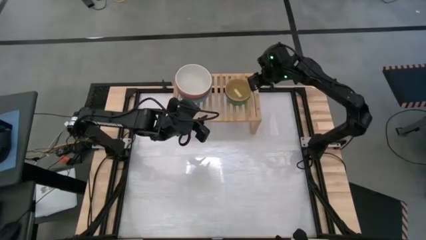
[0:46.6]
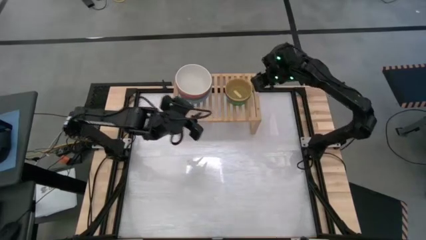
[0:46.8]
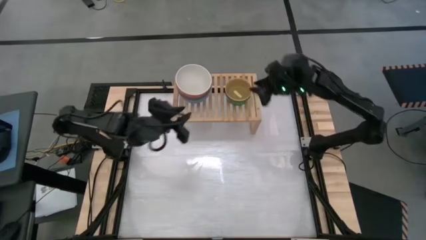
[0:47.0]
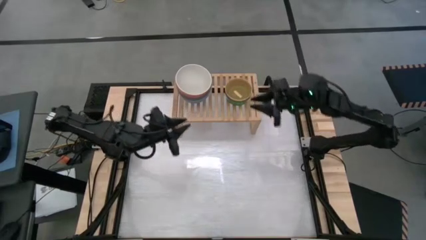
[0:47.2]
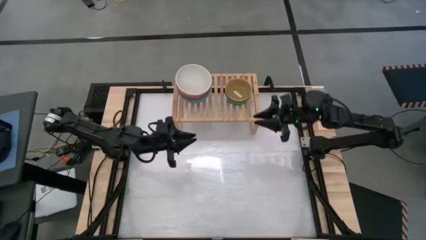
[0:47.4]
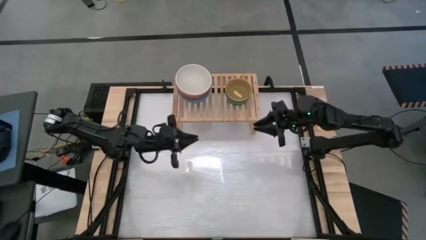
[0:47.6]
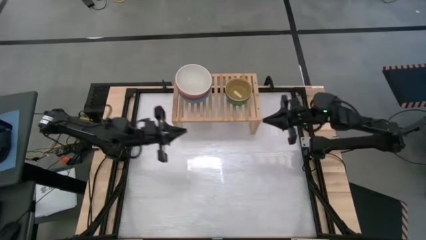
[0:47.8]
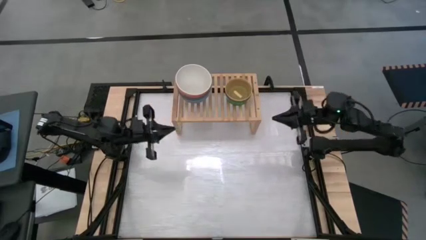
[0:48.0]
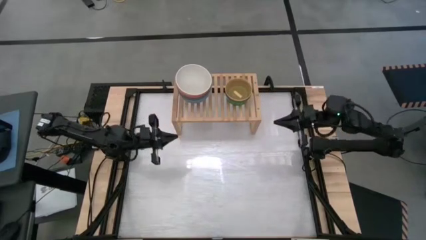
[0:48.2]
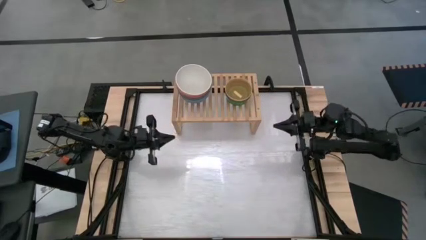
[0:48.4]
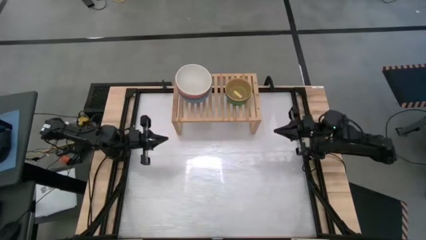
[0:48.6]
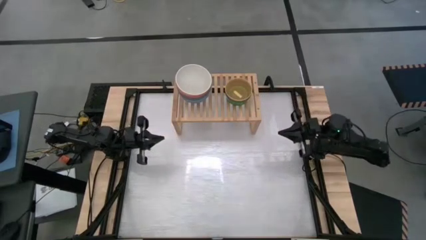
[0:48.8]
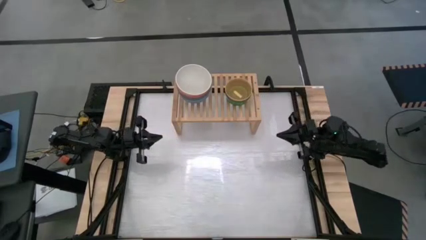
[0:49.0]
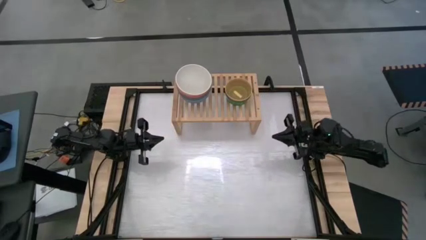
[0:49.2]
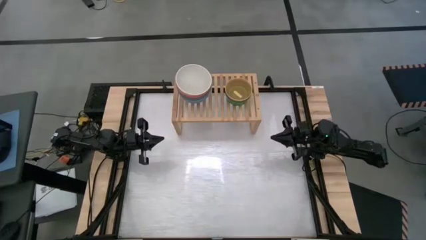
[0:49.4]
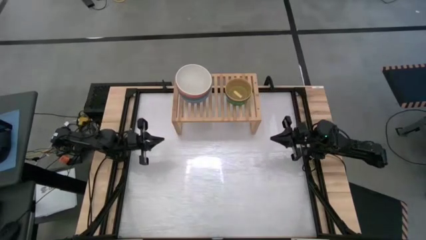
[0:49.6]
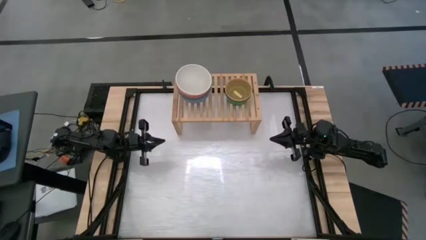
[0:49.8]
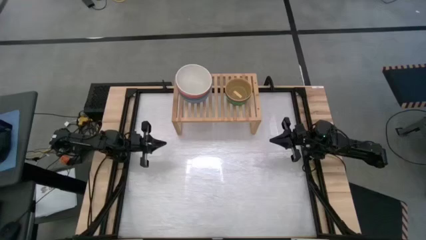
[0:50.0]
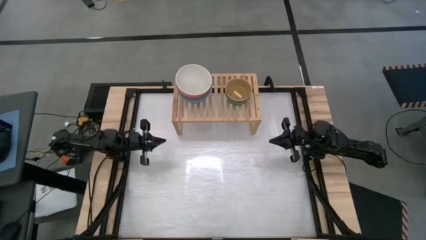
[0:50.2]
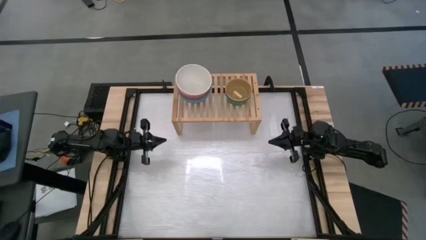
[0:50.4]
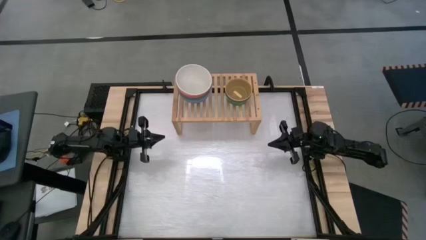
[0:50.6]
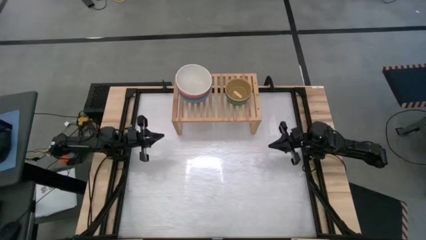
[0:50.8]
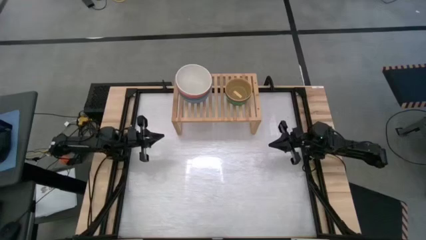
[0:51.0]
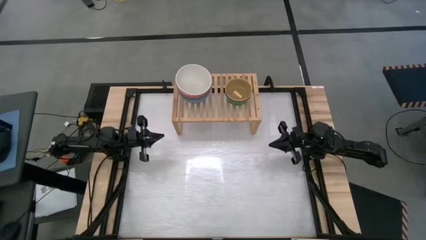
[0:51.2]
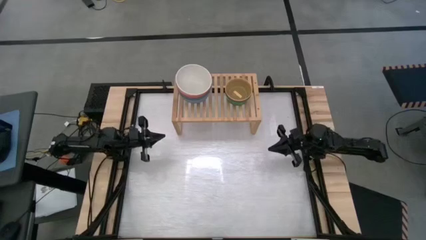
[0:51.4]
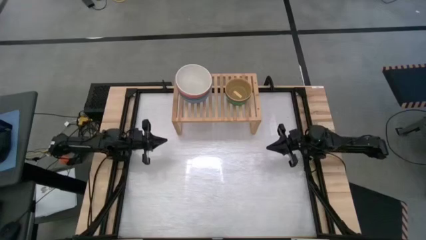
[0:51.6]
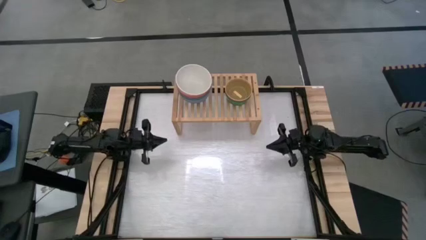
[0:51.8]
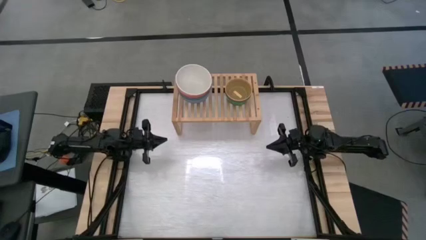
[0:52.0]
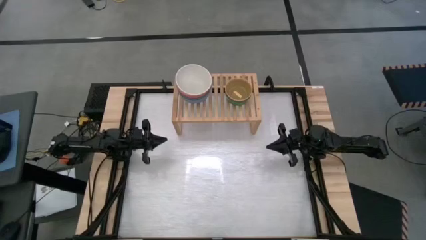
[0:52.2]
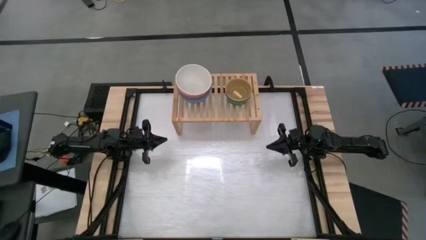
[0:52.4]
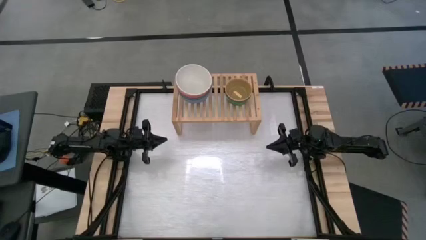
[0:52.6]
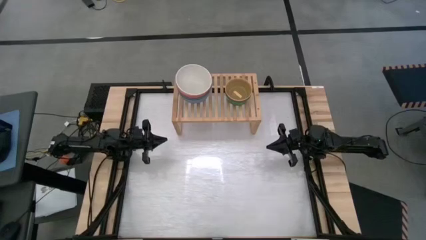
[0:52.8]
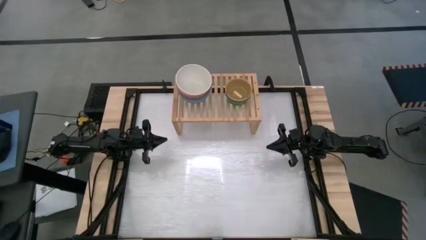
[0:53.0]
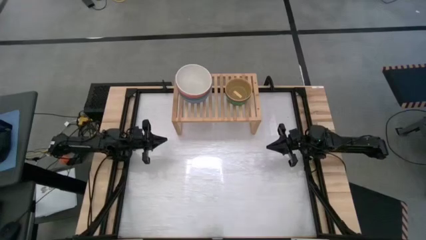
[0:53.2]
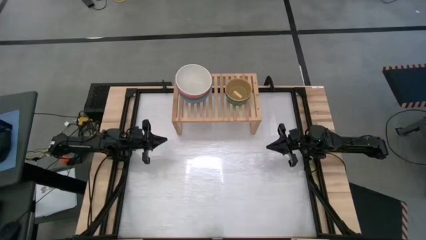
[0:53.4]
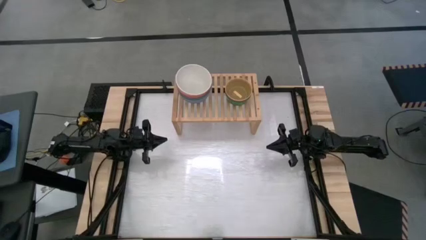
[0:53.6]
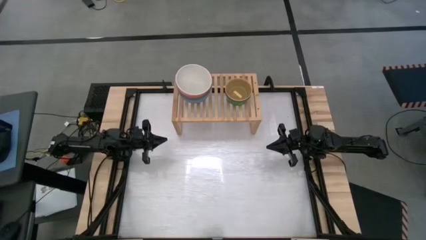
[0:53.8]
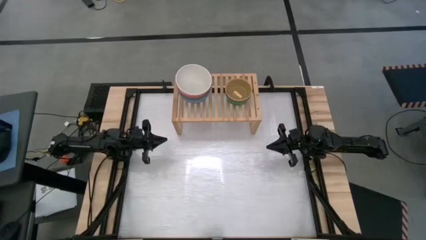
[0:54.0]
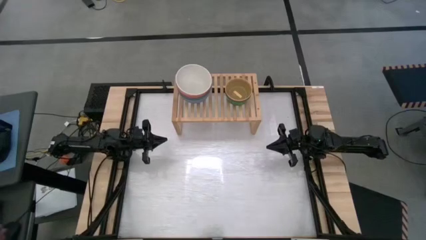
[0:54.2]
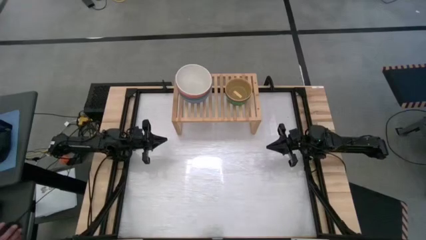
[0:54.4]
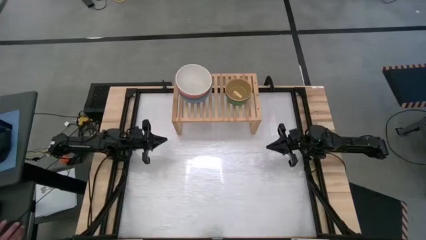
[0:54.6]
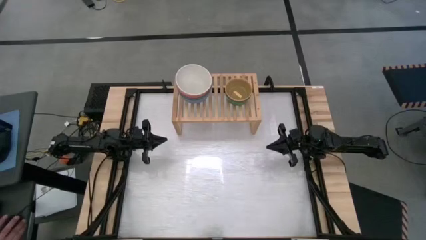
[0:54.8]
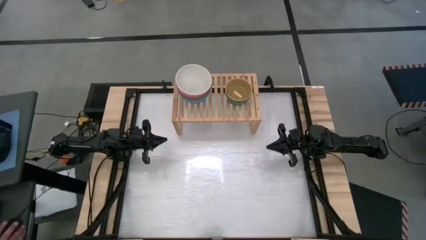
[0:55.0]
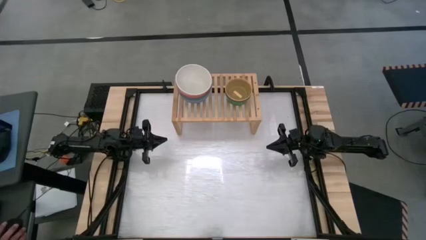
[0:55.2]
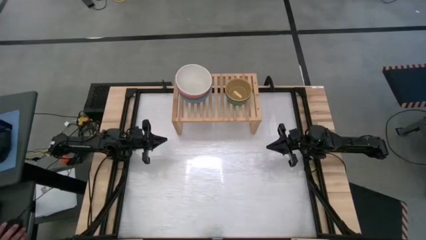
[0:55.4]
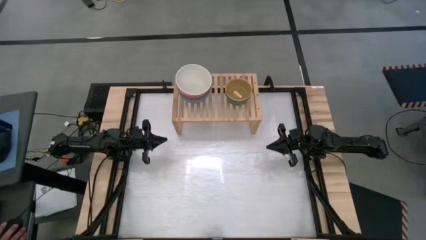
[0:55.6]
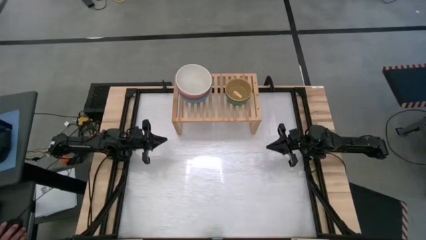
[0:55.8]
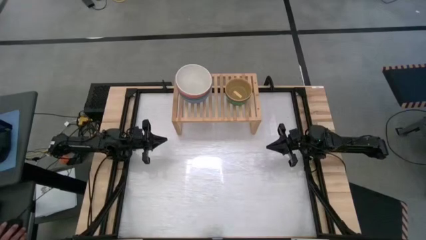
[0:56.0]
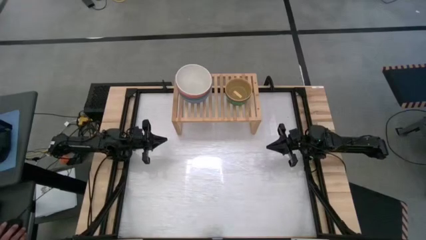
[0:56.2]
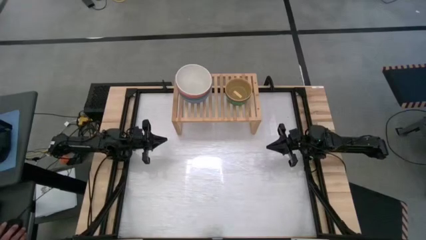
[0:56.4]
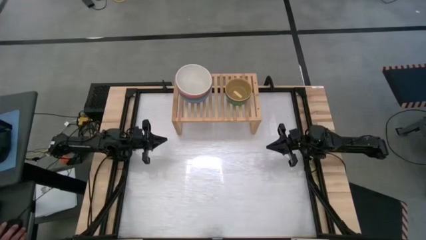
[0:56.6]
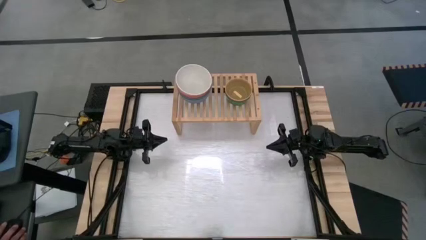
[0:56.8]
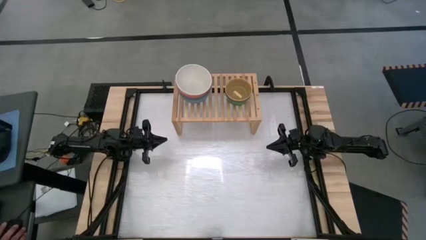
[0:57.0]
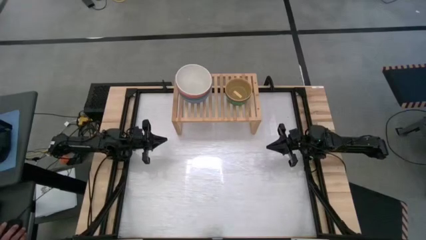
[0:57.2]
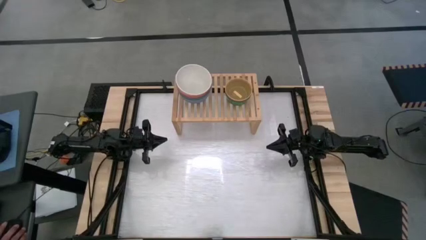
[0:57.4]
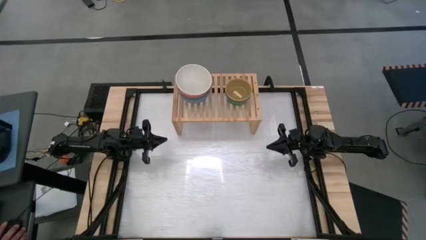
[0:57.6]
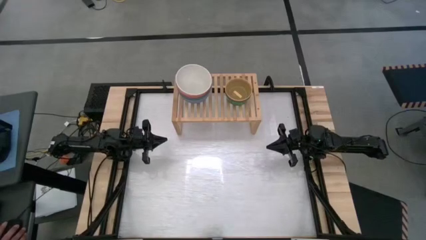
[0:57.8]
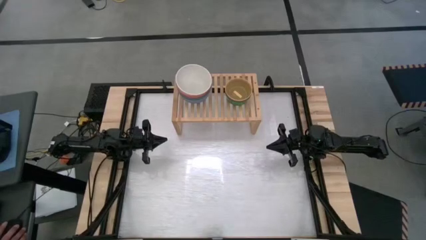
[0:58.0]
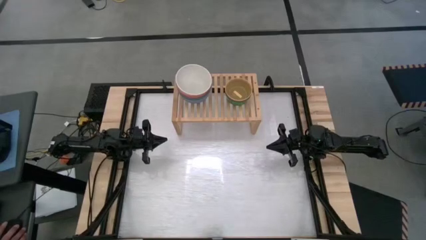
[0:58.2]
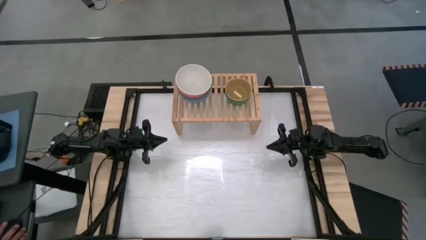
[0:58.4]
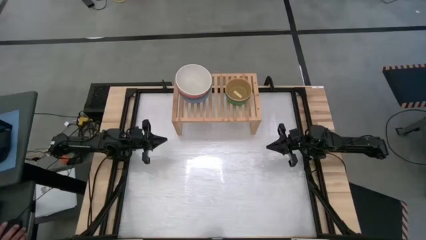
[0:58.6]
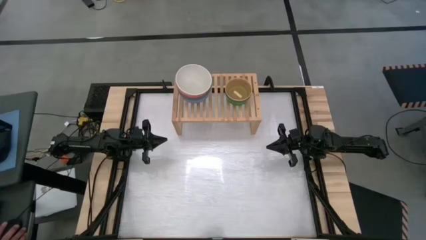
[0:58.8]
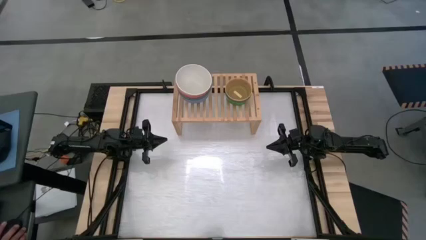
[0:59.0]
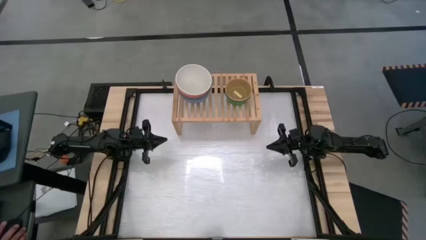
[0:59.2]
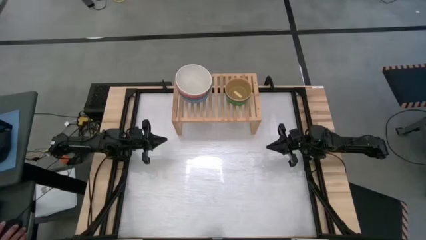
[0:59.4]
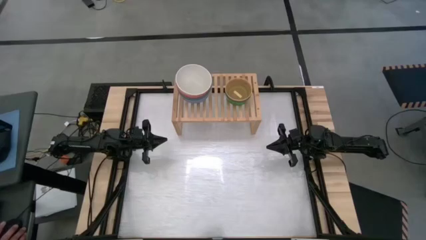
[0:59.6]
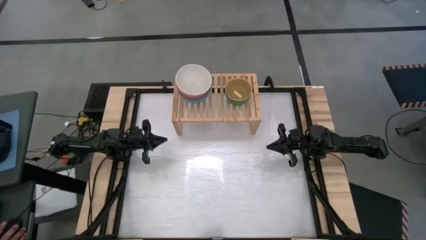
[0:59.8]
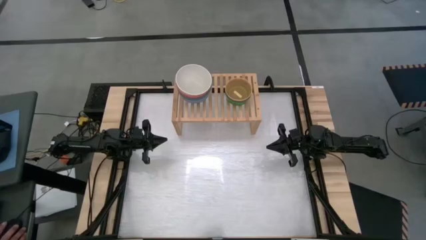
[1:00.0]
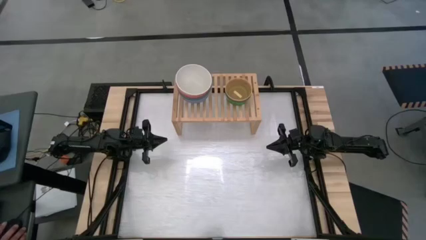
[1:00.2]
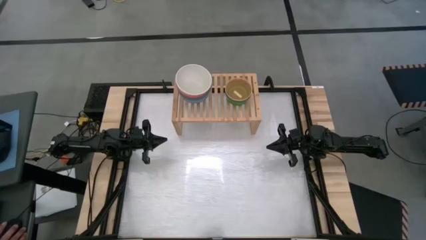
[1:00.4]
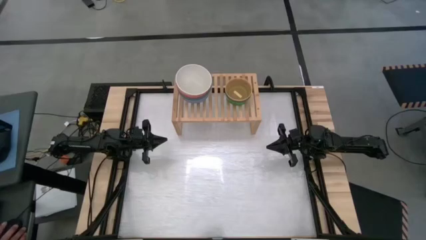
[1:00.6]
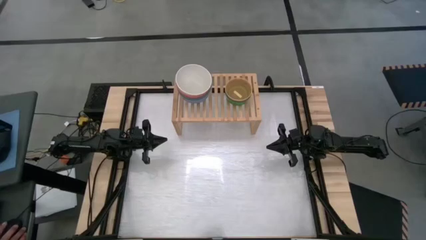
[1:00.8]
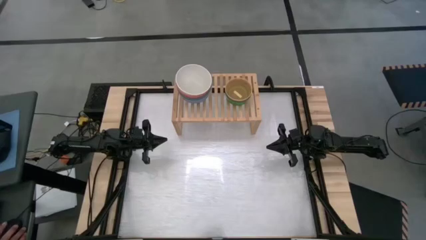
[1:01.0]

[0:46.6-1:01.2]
Task: Place and stack bowls onto a shelf
Return to Home Position
